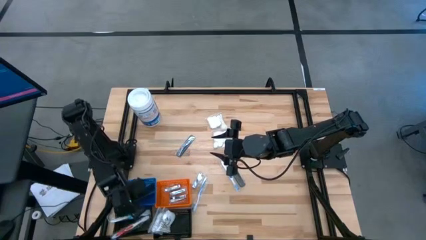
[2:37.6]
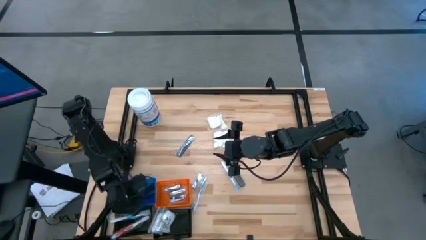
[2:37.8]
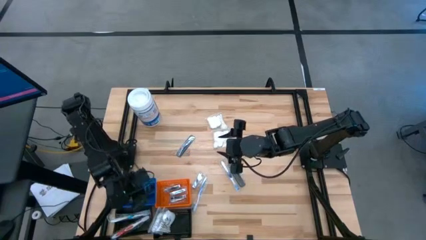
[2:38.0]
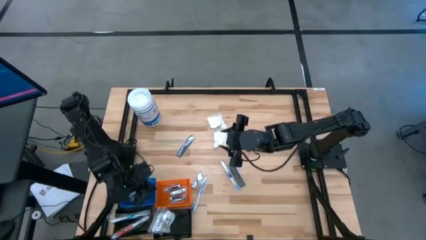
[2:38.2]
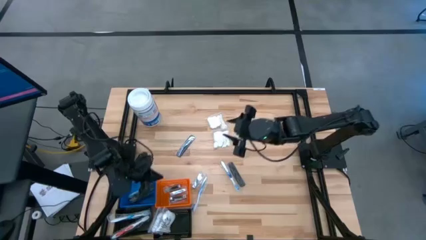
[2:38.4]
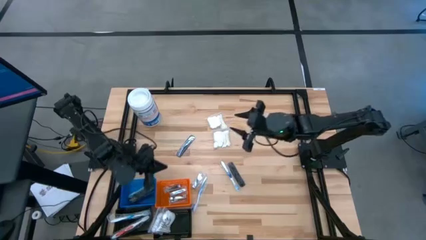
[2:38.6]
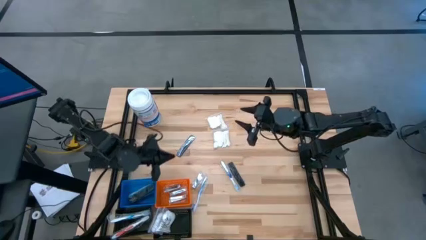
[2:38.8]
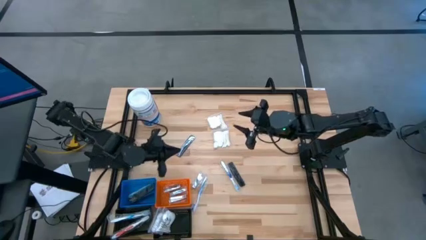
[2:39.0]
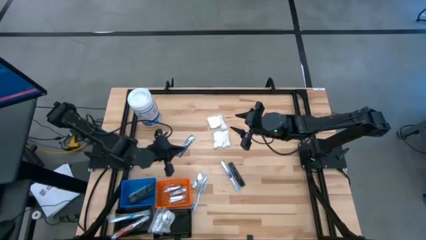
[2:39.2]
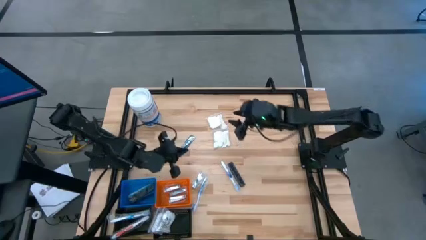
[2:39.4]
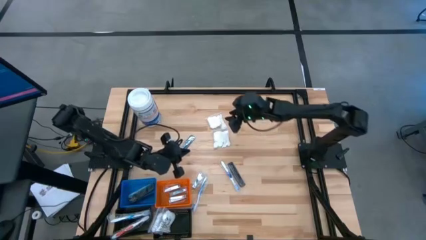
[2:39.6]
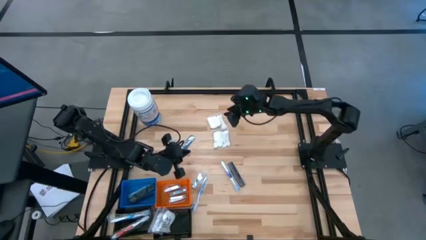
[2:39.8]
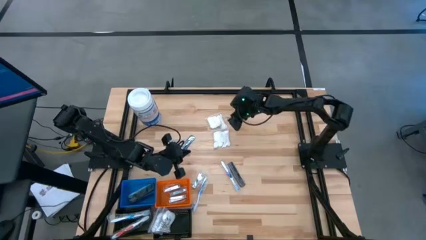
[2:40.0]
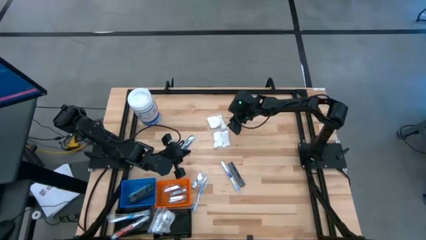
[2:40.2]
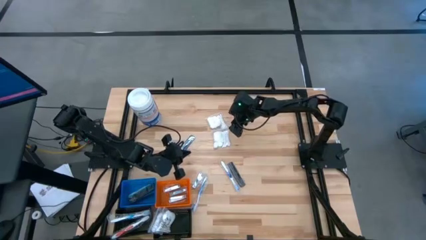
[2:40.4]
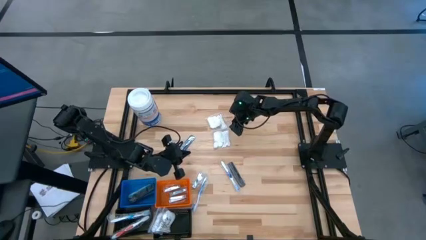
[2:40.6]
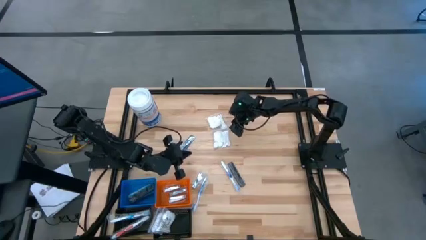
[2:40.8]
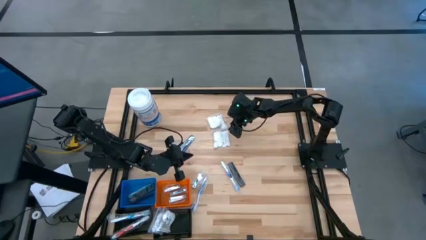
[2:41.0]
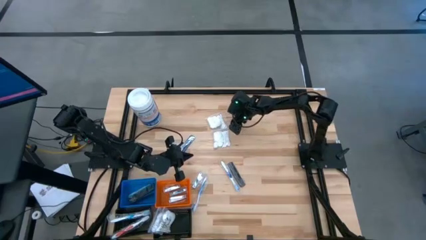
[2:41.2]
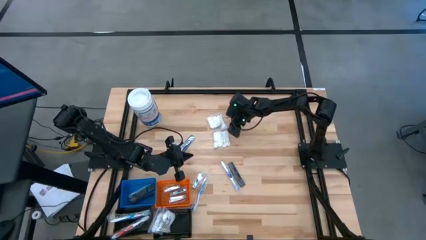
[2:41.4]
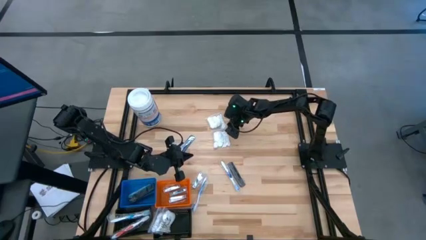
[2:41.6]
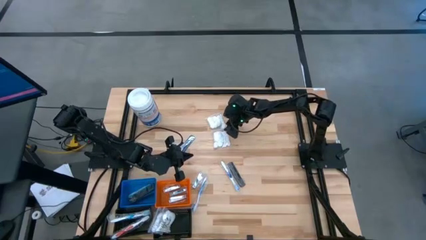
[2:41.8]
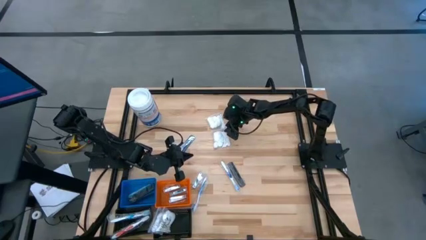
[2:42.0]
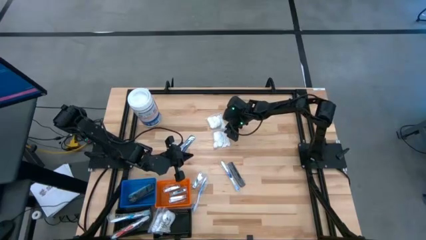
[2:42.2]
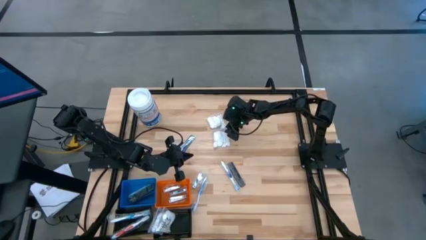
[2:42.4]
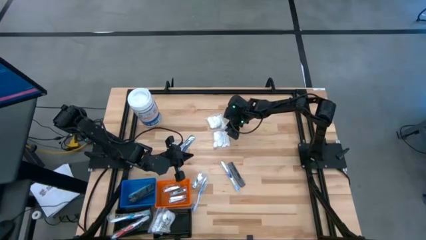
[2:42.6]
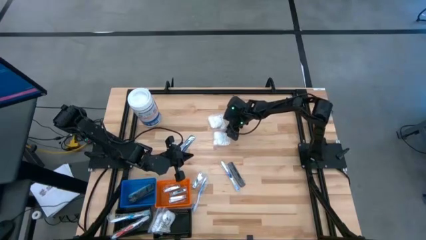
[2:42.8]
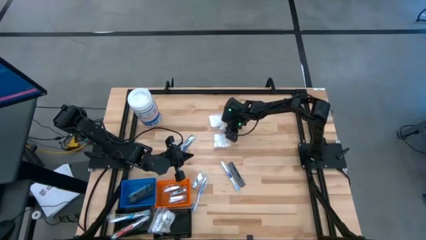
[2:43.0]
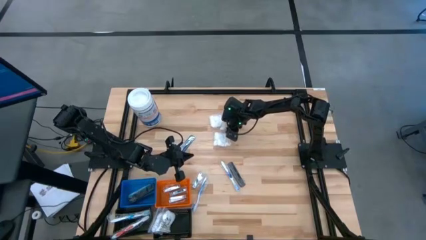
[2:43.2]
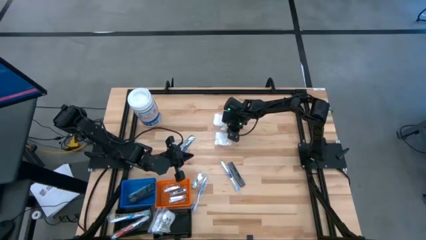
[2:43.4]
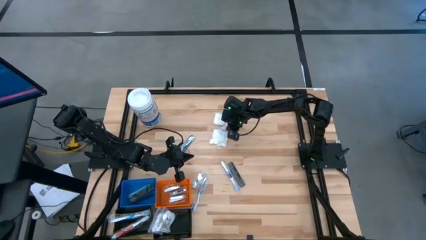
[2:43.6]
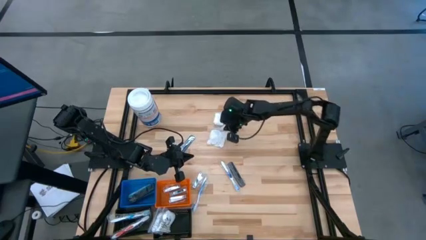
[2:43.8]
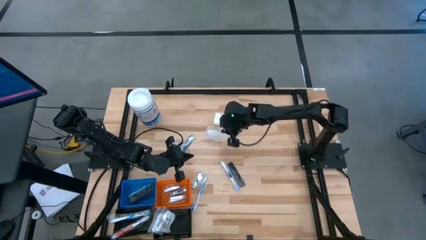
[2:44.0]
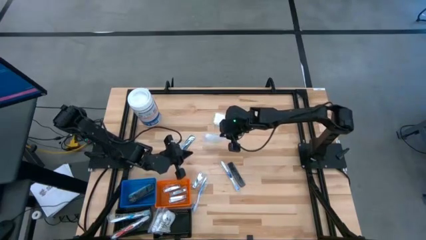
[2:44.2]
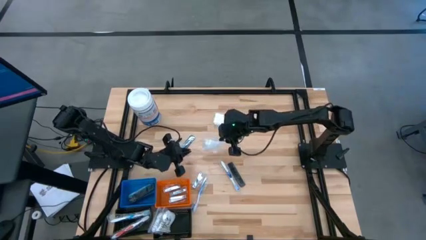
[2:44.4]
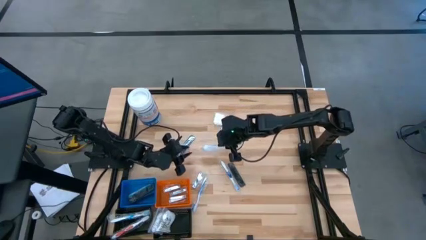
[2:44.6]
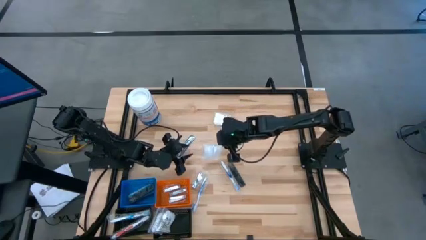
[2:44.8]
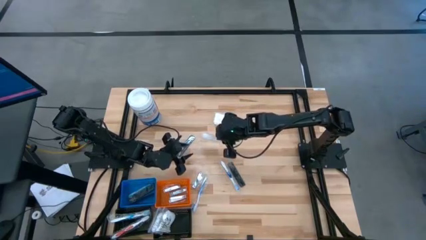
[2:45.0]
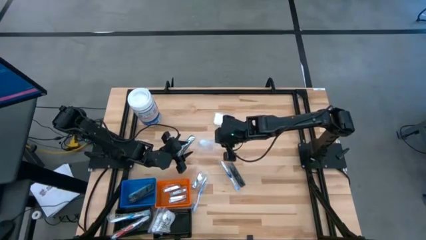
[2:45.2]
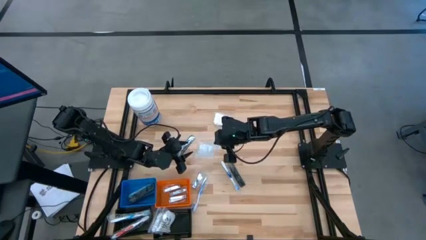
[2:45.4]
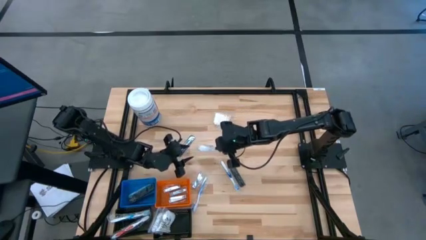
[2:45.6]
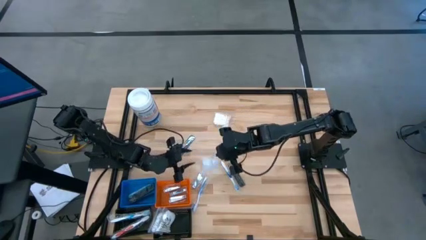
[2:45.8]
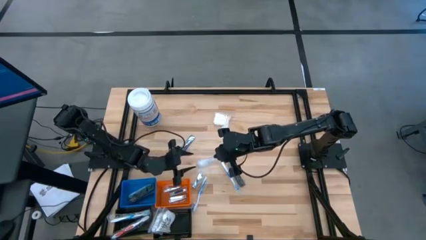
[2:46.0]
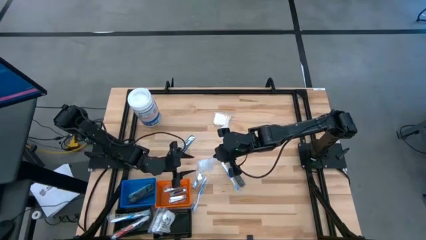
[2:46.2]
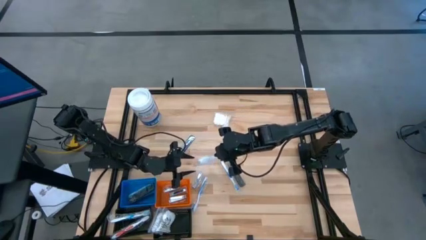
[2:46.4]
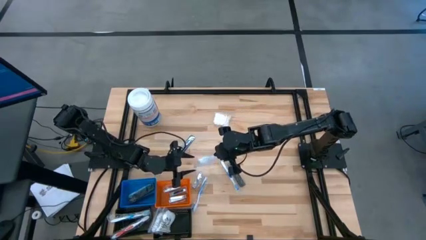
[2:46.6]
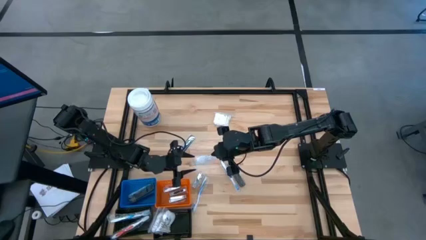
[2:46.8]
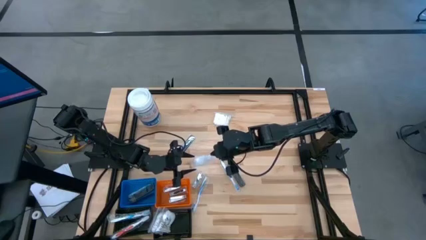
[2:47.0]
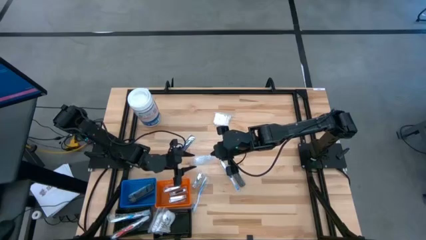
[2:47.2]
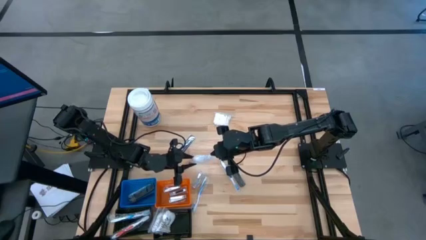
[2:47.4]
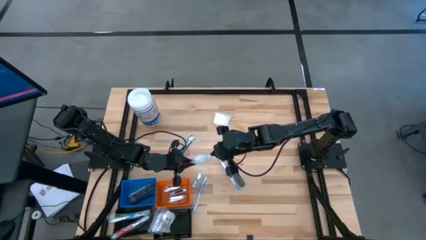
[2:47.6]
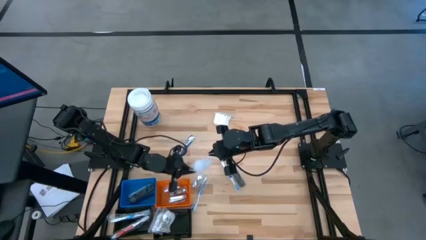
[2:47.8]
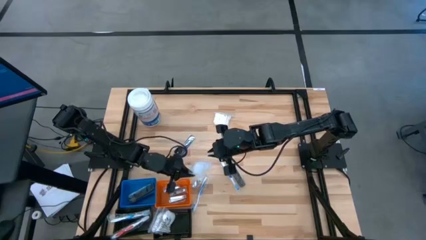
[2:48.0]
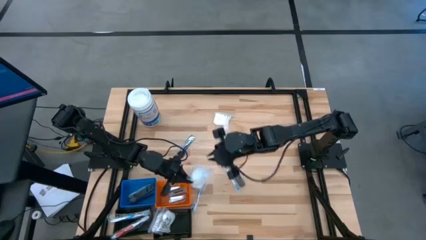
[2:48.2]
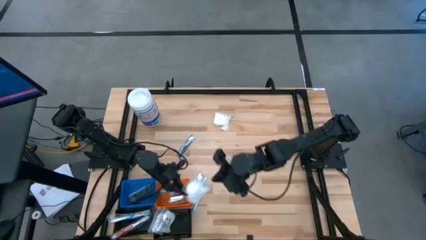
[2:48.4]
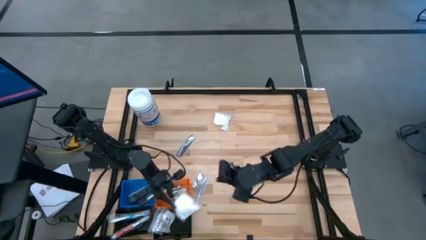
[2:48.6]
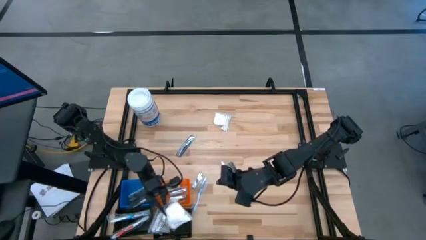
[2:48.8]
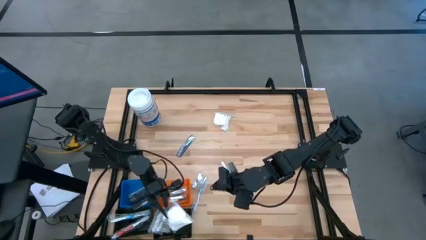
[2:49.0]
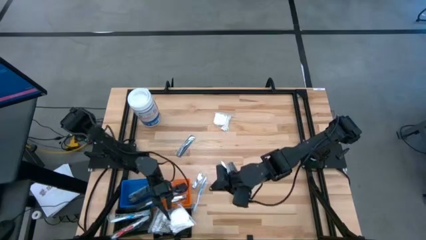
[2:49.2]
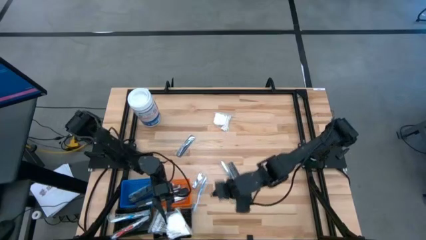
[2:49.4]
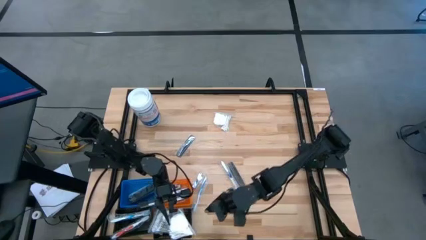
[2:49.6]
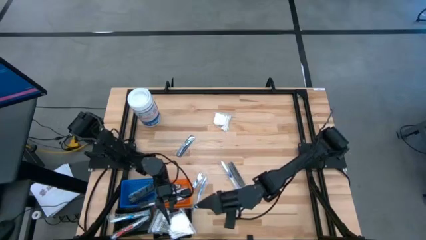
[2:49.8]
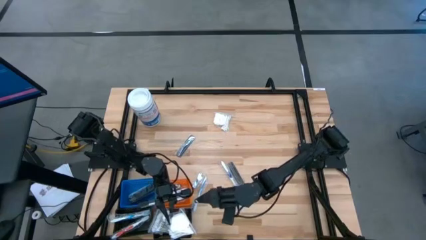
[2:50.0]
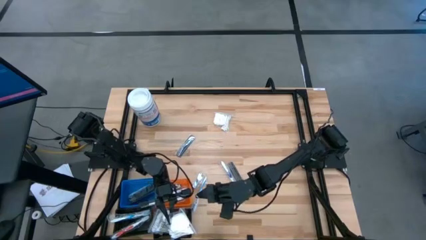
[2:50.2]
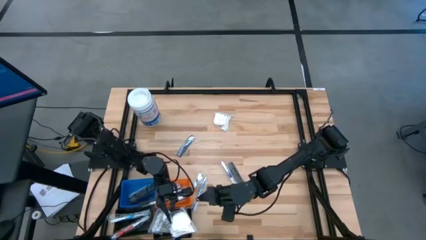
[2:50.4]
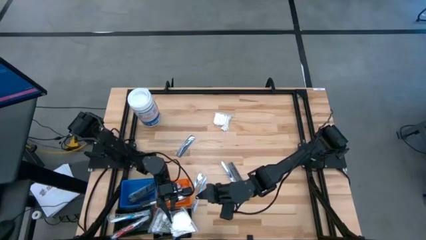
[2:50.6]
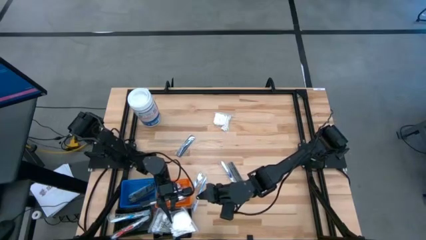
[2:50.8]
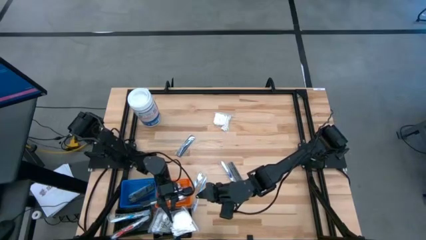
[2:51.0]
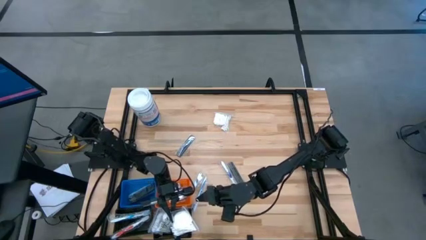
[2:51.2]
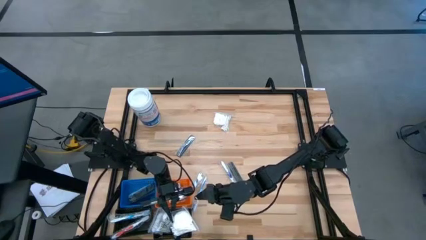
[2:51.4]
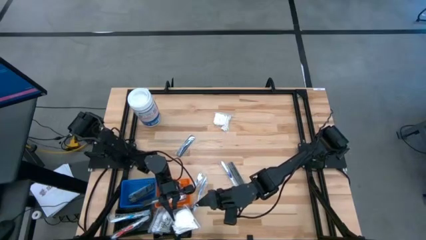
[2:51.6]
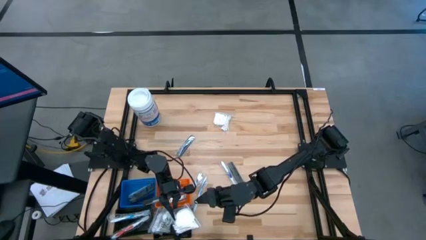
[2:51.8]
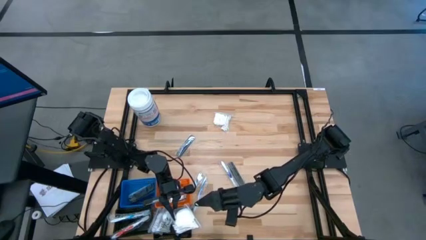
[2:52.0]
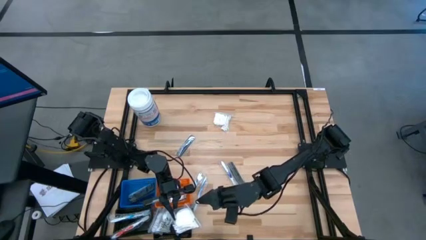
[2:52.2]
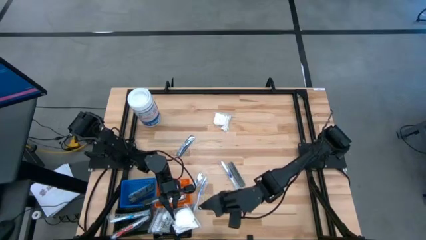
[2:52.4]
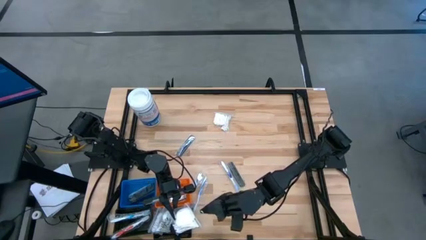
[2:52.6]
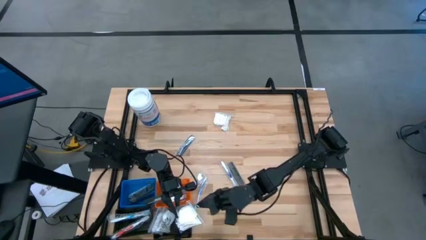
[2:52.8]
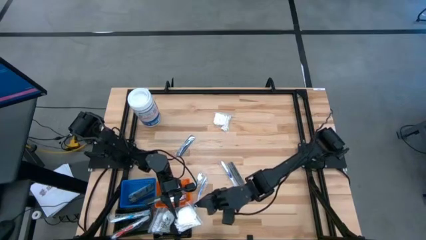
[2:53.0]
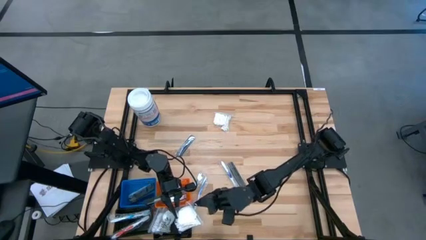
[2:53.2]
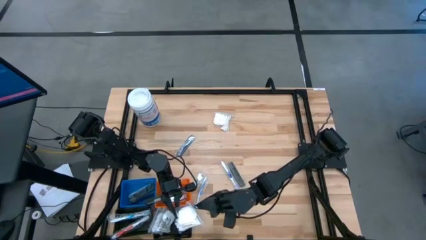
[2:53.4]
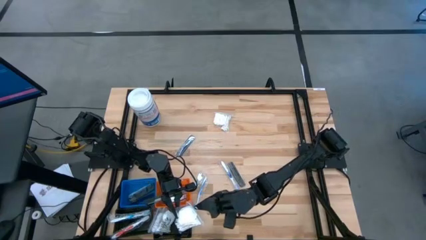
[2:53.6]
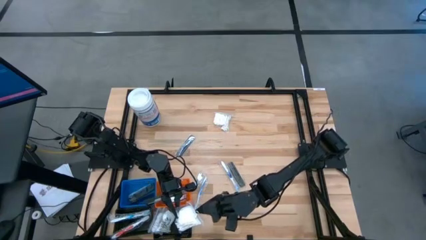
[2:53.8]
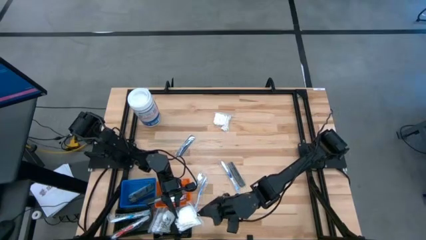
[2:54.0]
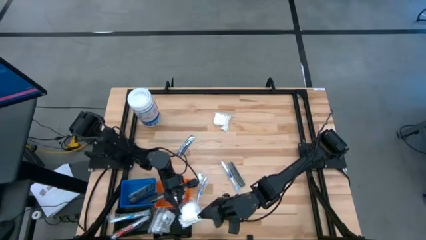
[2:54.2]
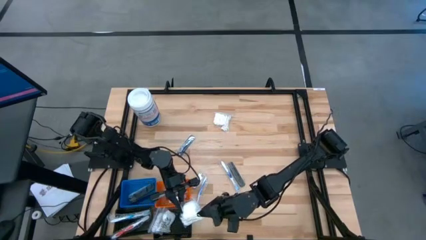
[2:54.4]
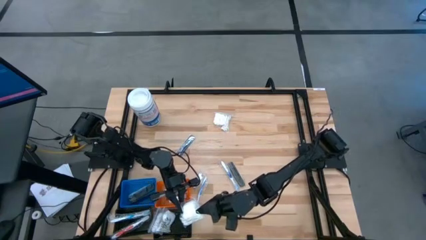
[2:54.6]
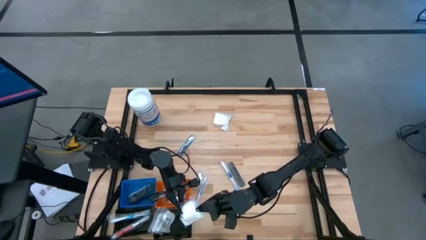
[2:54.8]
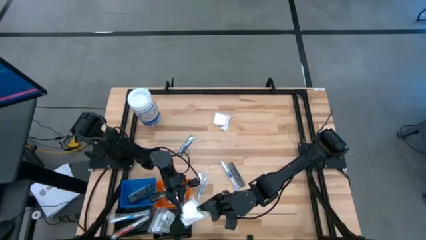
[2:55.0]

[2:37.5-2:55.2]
Task: Pick & Place Travel size toiletries
Put the bottom cotton pack into the right black basket
